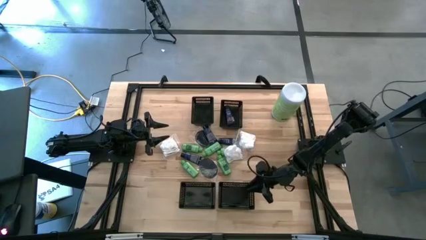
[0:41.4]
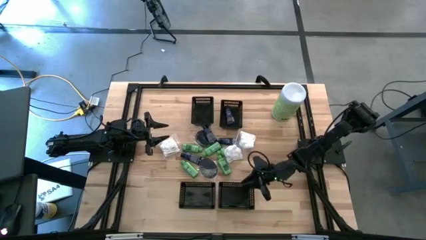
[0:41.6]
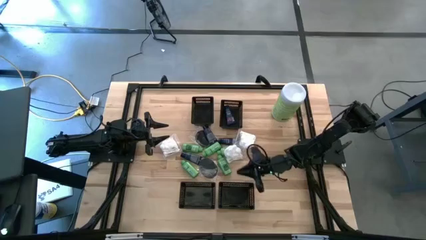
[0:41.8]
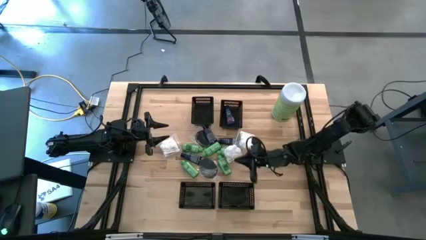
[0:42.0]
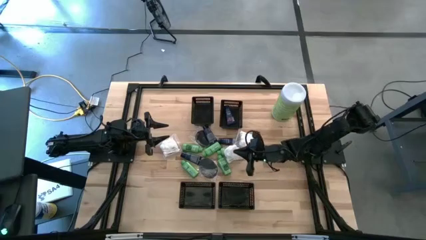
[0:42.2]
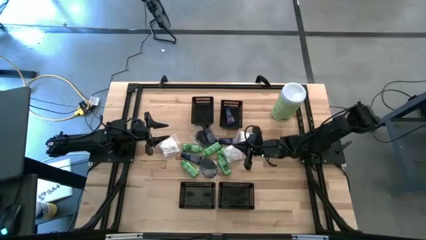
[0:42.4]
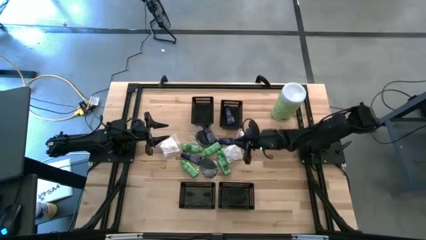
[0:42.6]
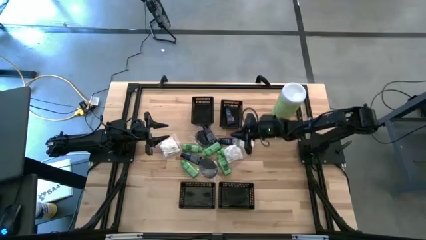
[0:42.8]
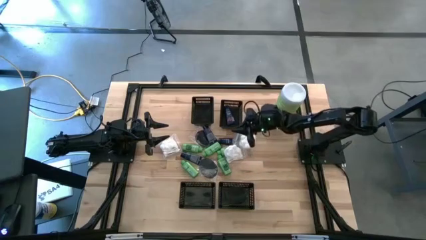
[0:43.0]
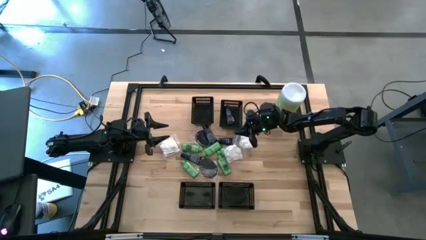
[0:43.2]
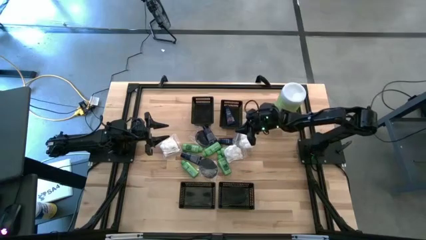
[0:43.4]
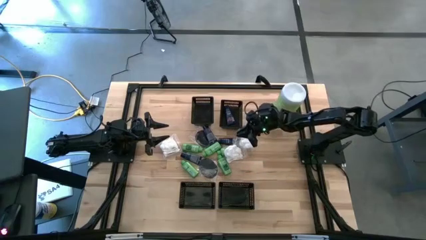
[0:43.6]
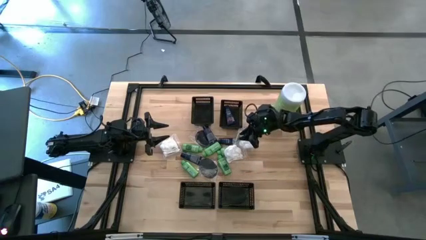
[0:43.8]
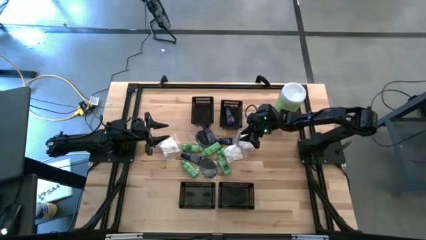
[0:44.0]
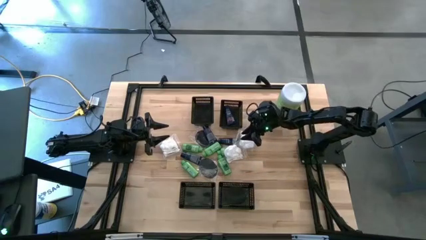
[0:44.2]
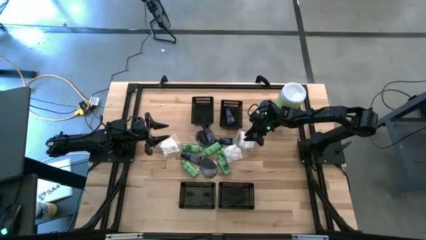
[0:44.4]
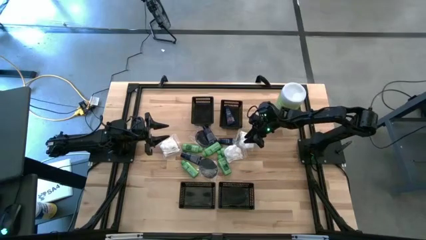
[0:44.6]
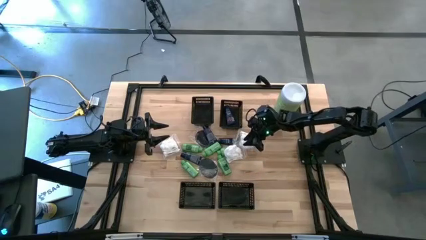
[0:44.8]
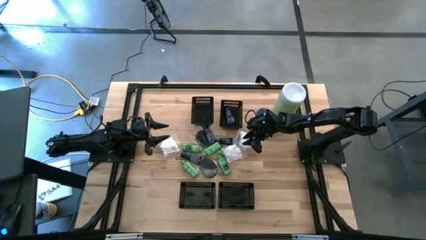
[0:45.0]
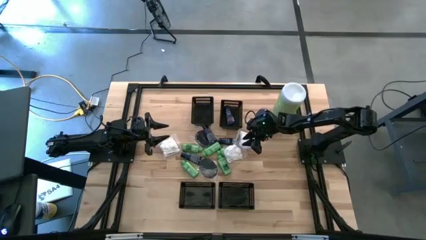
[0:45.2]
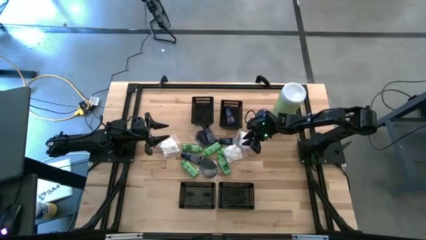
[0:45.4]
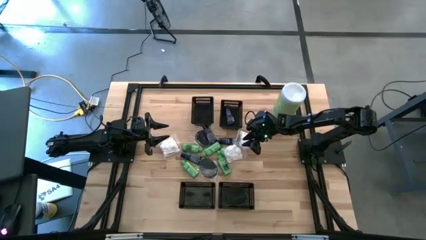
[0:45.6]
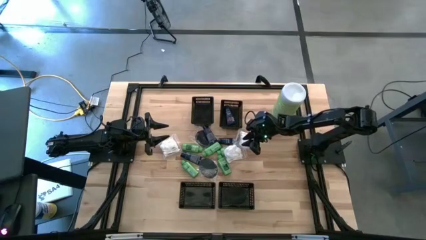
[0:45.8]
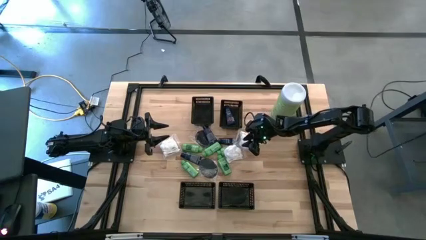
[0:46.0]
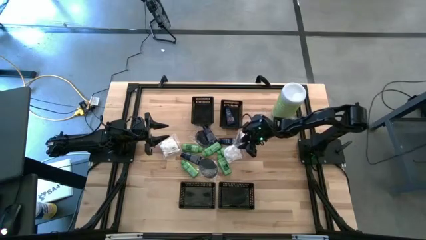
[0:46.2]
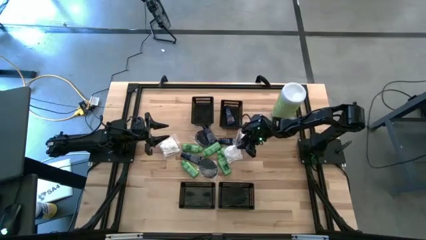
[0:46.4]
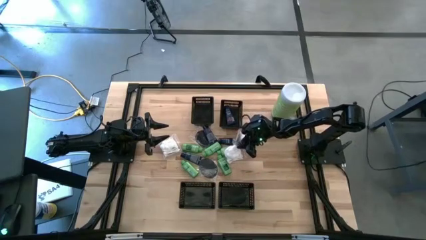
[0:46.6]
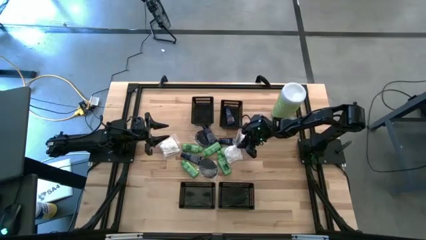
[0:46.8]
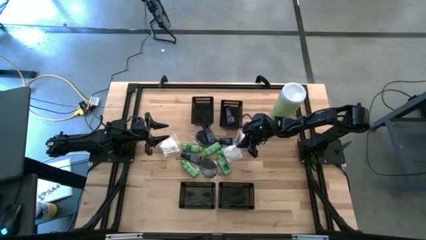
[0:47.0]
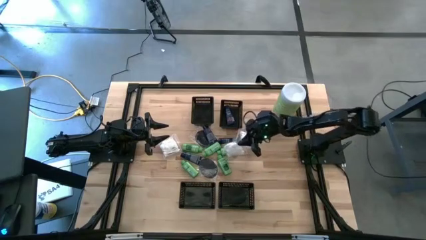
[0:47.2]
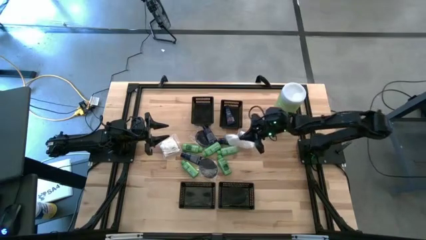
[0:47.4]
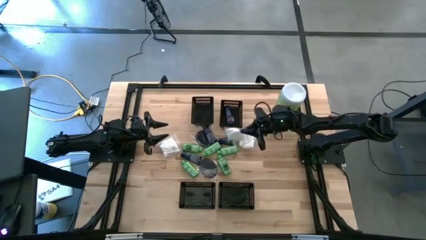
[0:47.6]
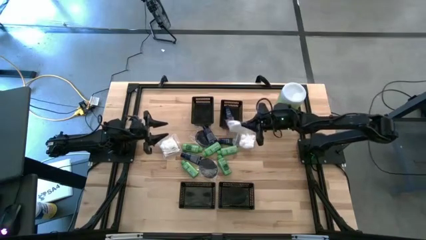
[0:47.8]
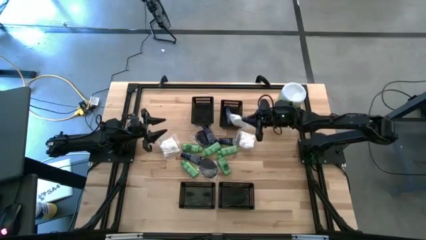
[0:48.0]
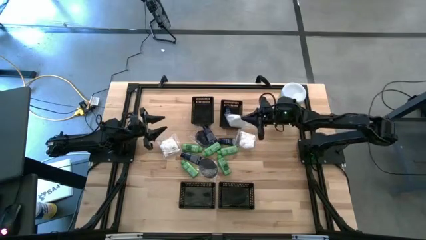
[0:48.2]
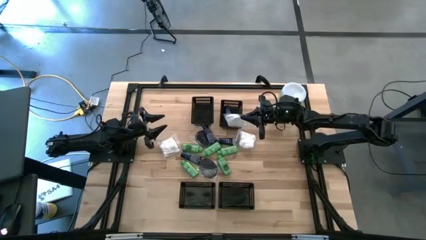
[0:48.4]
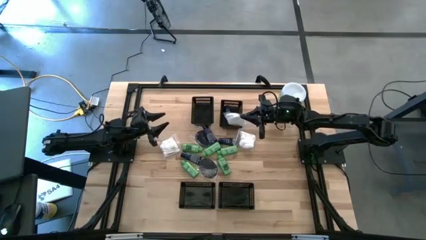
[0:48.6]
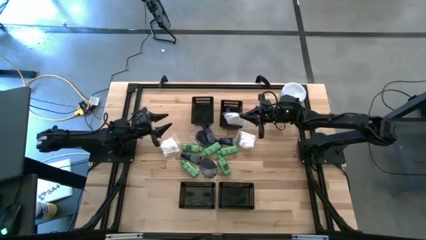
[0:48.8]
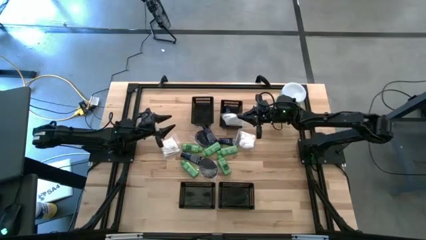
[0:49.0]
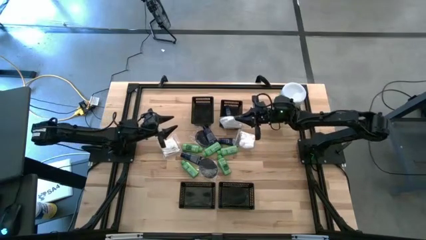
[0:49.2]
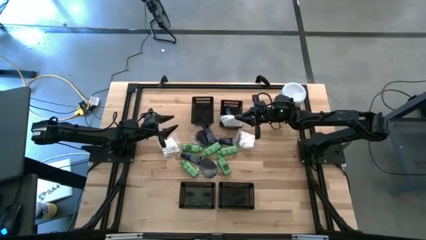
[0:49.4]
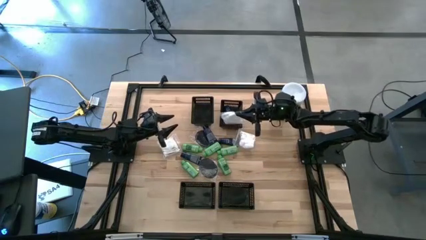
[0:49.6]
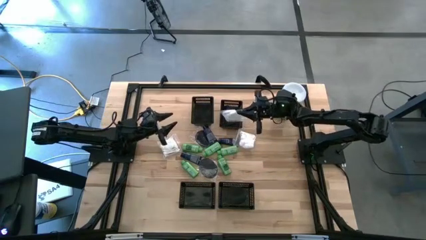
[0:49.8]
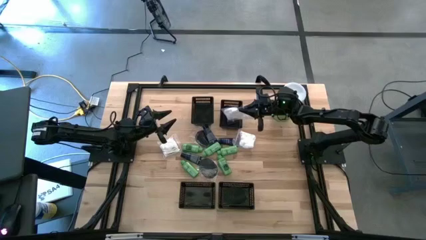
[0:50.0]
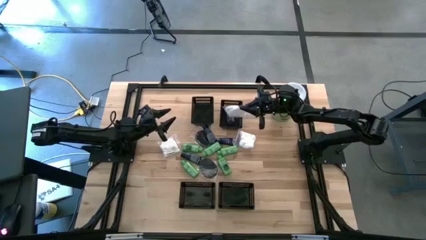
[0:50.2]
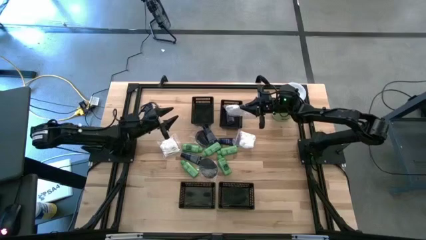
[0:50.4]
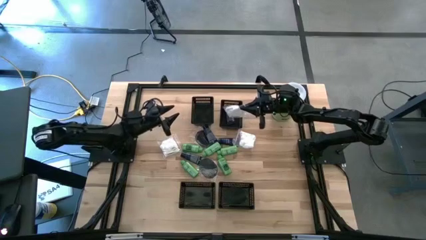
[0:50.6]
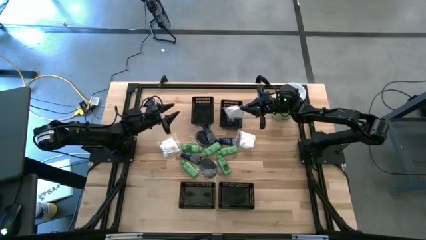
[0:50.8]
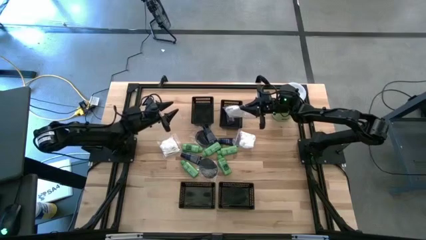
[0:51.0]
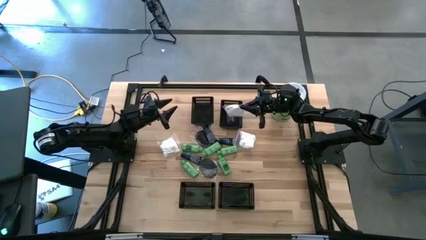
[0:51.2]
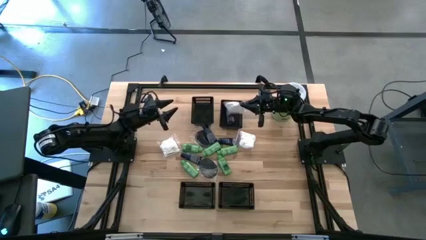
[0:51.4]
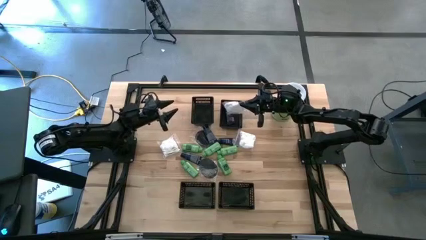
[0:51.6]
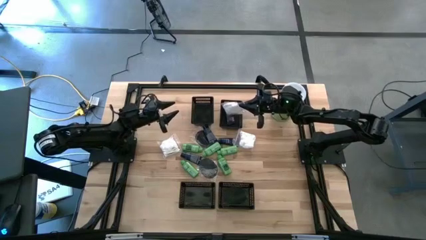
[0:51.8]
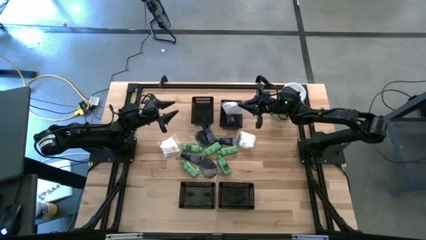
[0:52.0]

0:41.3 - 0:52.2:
Task: Pick & Place Travel size toiletries
Put the cotton pack into the top left black bin

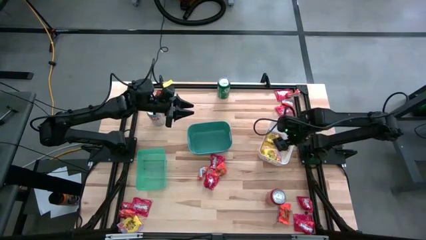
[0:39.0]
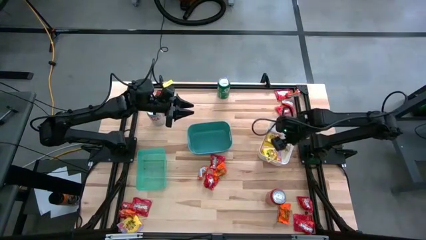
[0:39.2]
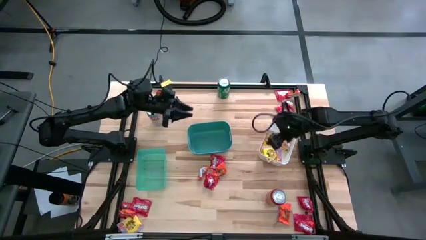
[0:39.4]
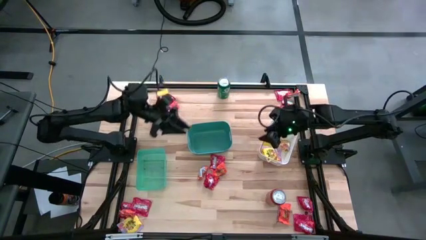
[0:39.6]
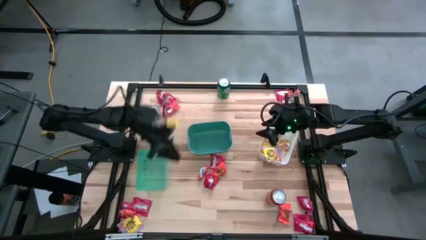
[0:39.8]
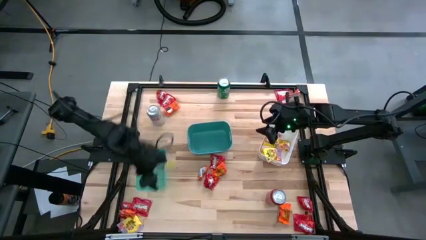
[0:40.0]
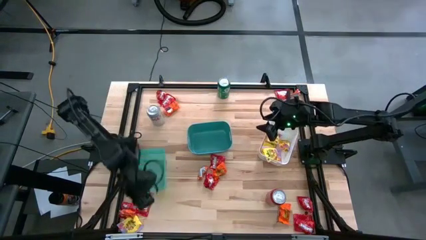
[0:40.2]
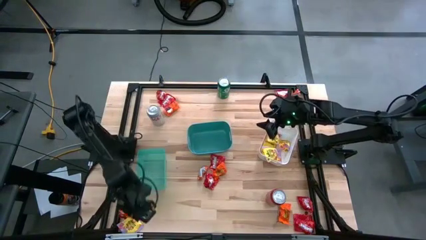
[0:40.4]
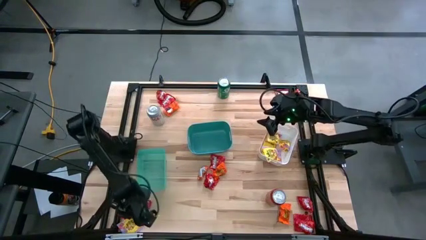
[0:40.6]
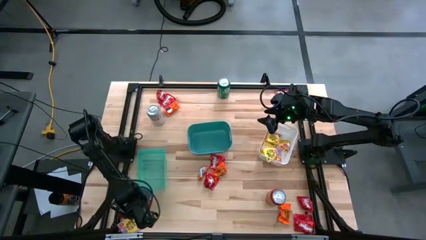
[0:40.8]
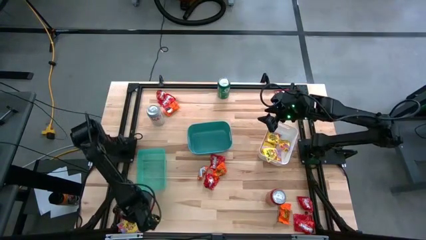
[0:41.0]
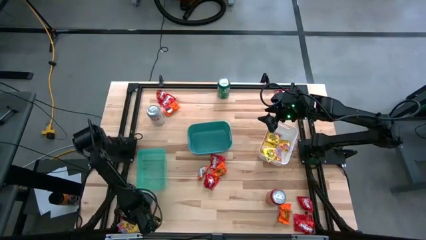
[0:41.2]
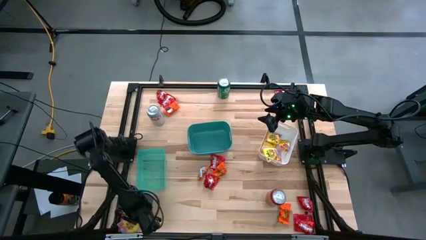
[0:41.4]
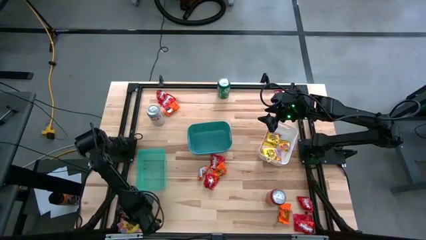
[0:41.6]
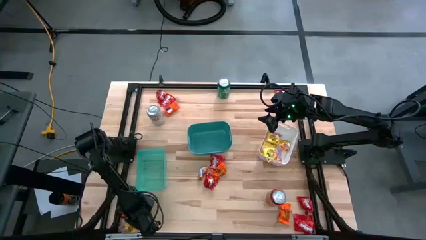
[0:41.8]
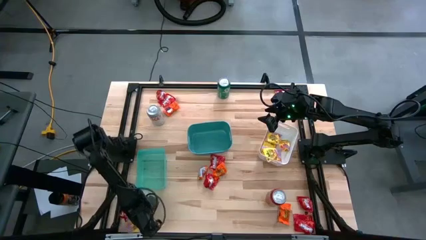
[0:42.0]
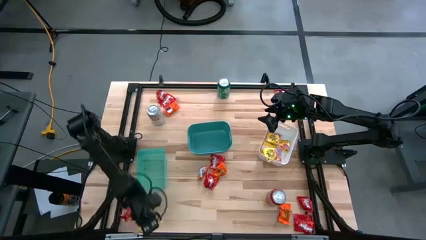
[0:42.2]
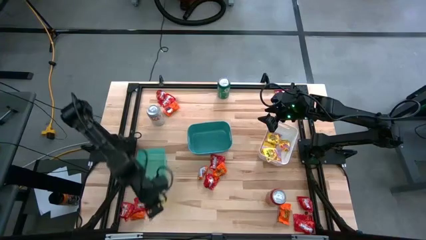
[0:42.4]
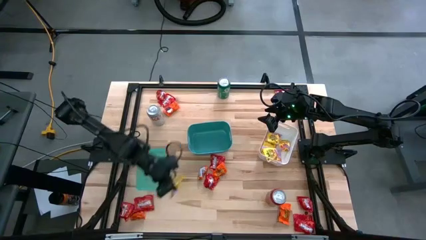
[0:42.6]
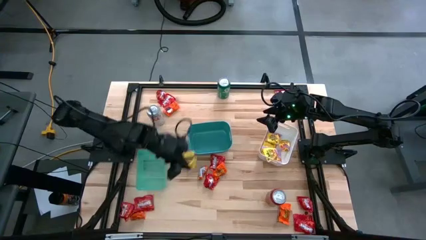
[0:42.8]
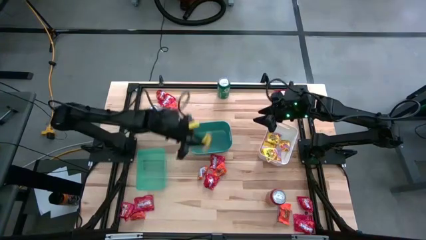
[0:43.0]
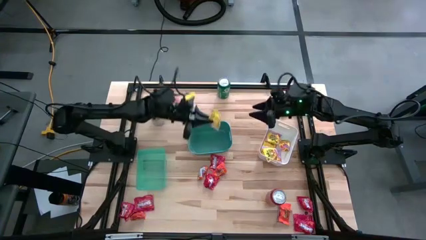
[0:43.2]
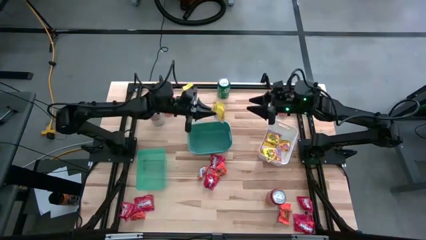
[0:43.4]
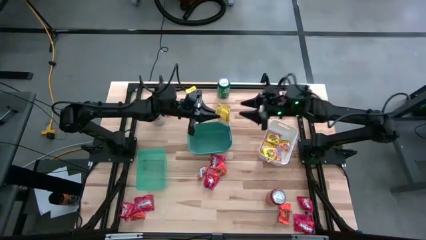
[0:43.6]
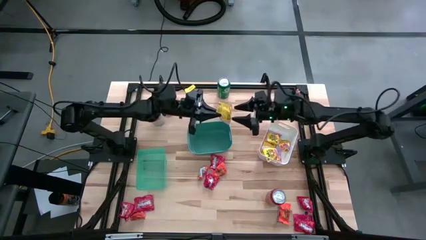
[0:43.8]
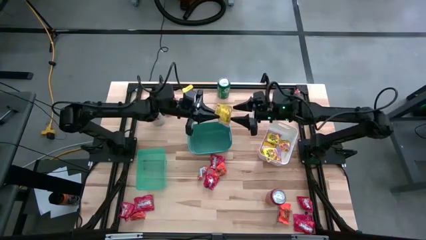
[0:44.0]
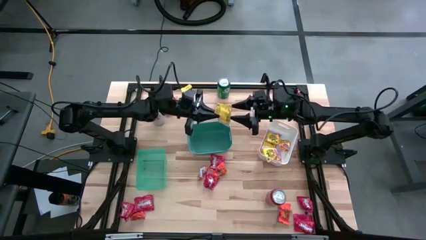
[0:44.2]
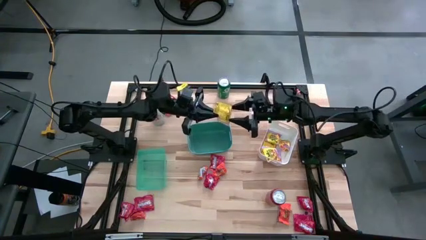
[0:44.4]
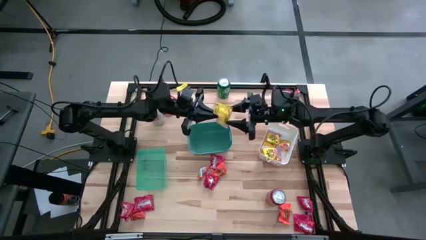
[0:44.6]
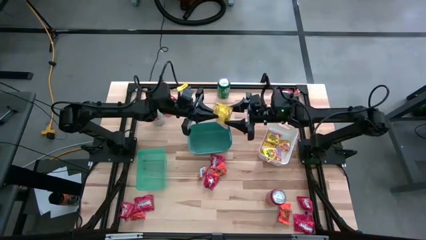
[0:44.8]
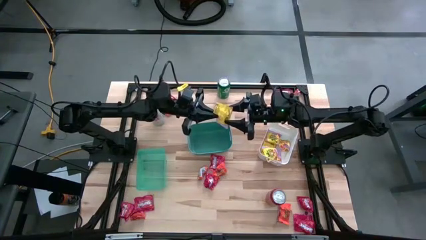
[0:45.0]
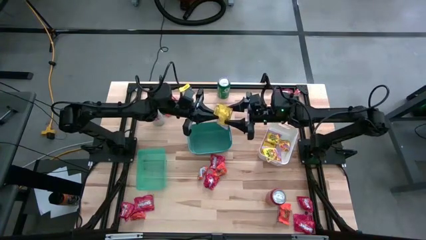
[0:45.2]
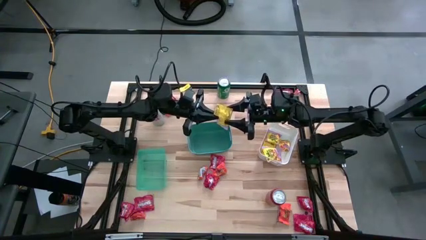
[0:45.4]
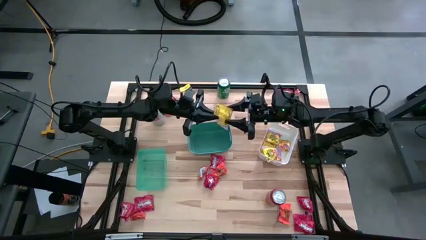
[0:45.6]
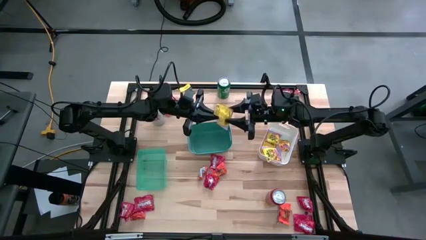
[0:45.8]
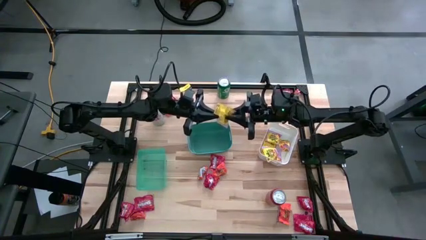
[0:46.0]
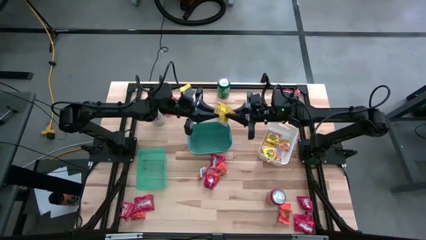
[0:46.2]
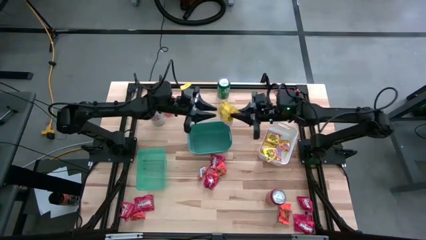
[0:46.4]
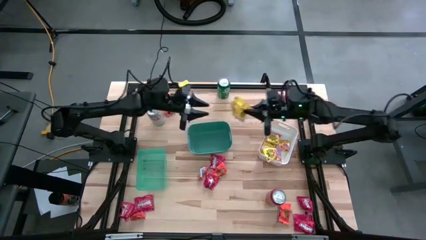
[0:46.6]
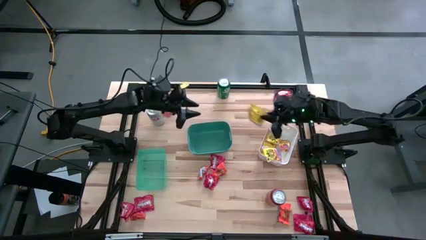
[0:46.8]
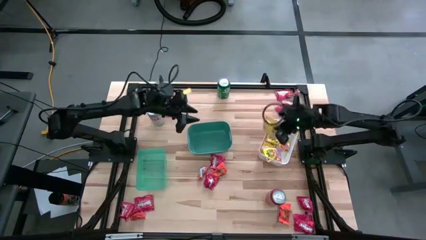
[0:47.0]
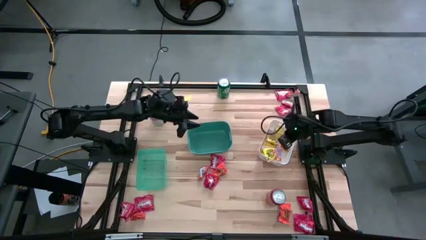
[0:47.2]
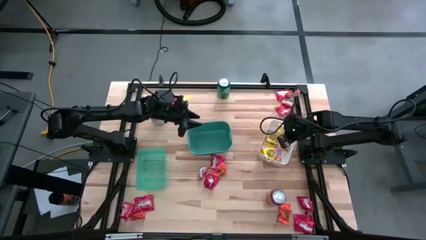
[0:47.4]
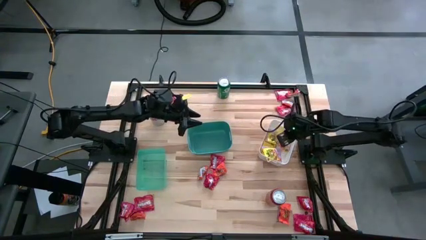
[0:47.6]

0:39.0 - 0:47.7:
Task: Sort candy
Put the yellow candy into the white bin
